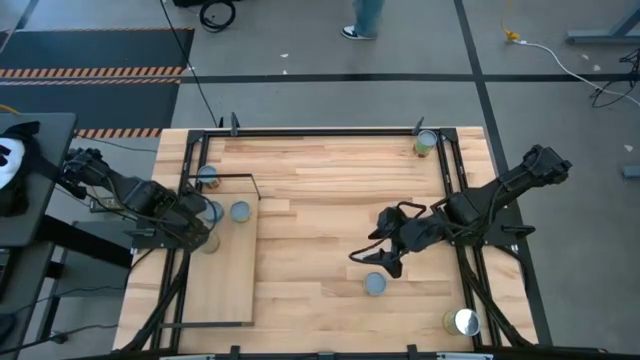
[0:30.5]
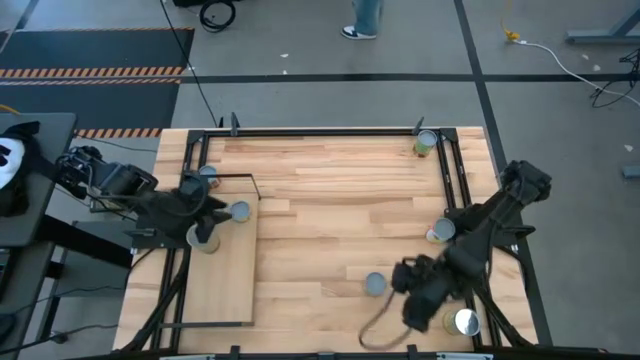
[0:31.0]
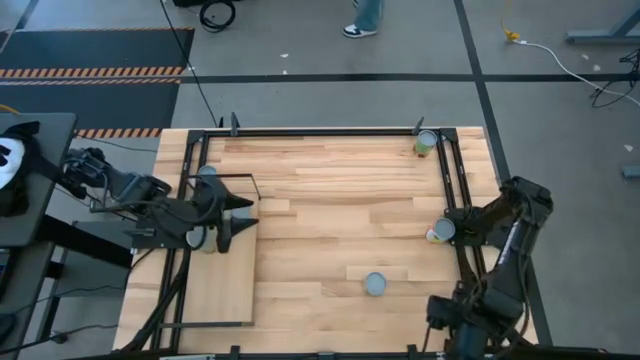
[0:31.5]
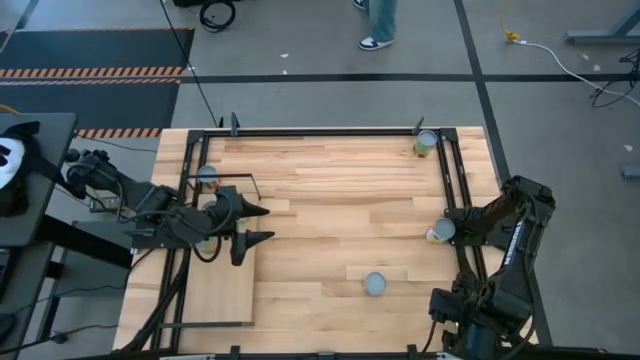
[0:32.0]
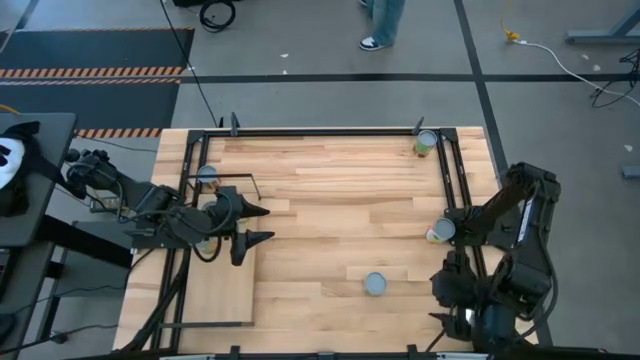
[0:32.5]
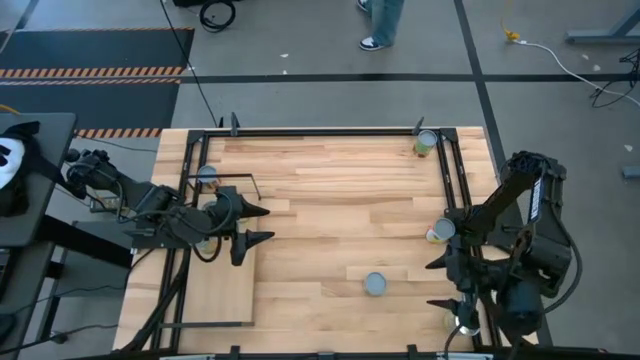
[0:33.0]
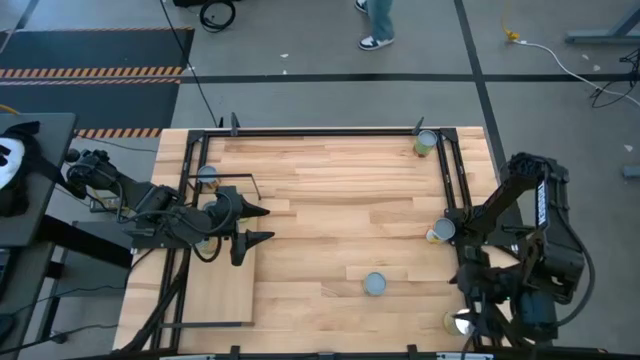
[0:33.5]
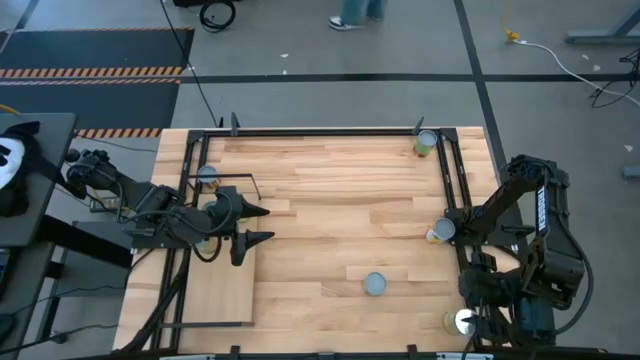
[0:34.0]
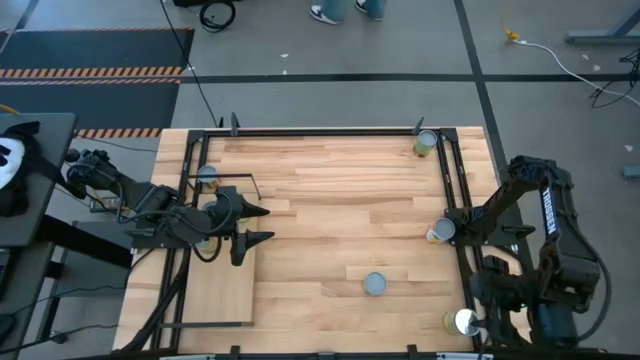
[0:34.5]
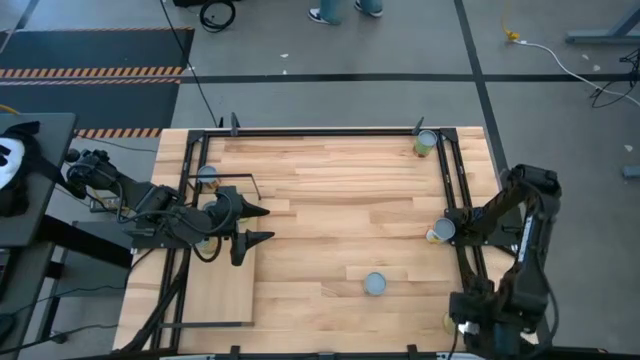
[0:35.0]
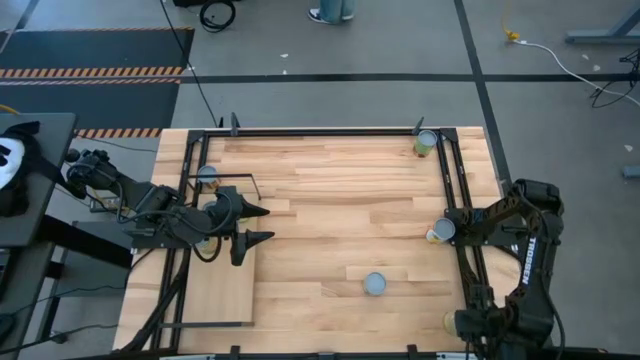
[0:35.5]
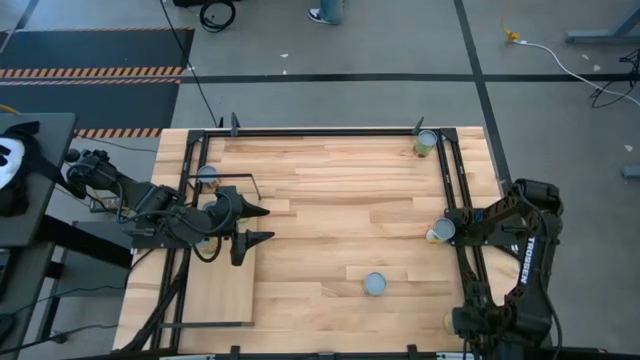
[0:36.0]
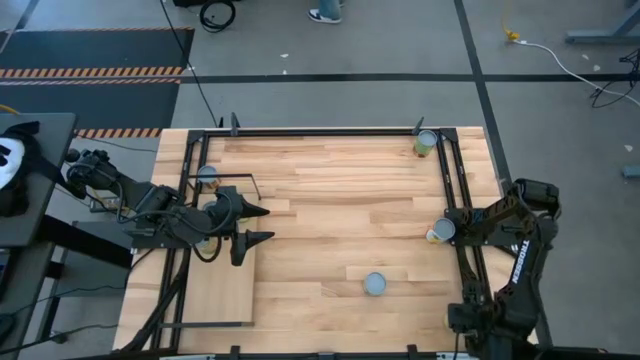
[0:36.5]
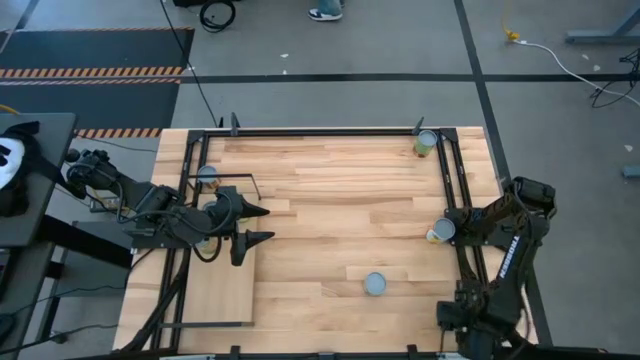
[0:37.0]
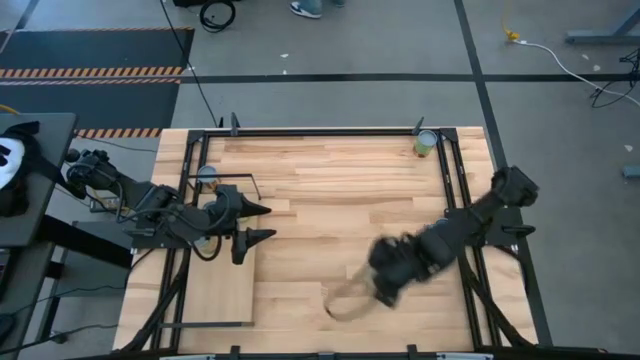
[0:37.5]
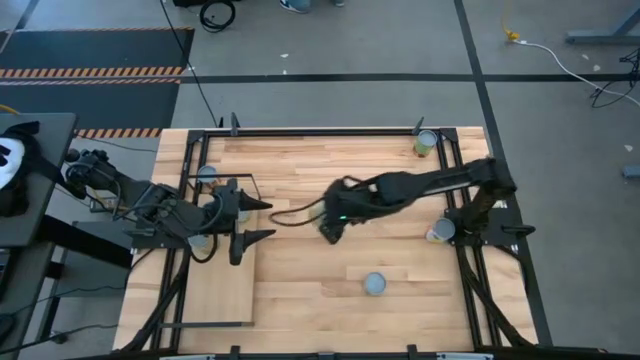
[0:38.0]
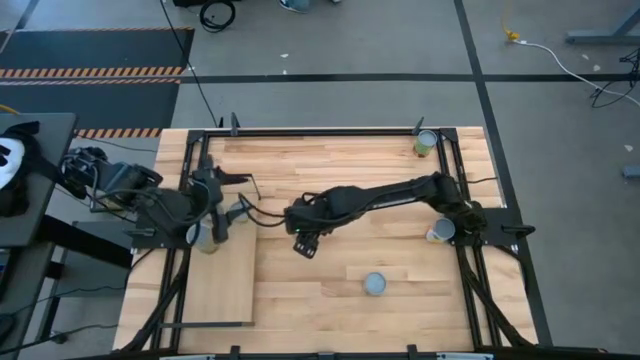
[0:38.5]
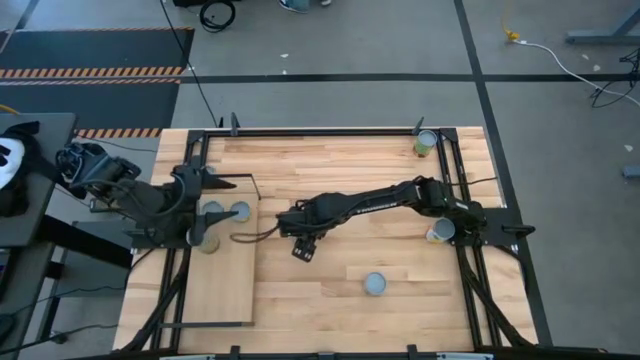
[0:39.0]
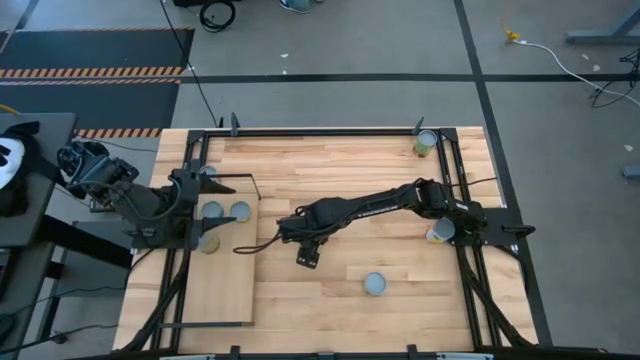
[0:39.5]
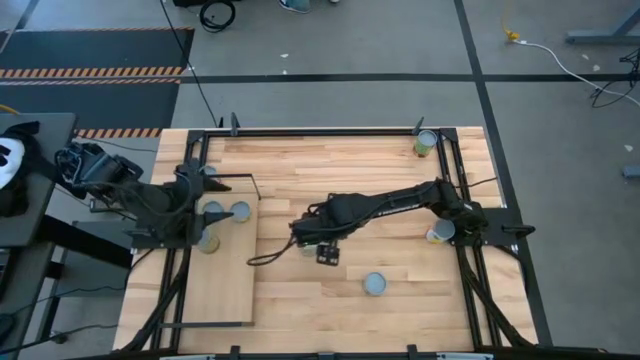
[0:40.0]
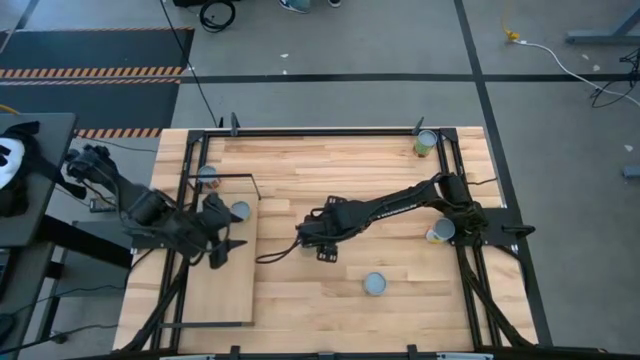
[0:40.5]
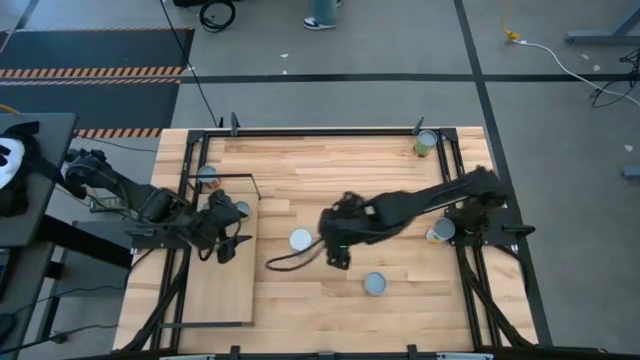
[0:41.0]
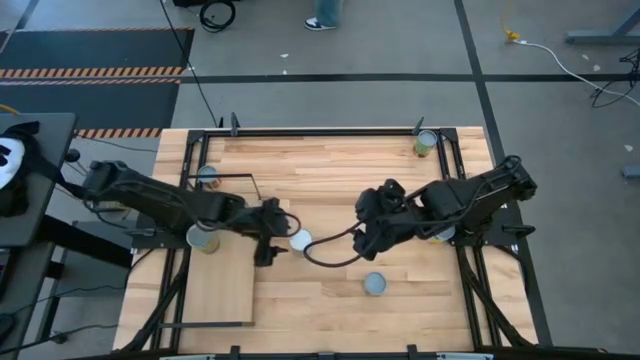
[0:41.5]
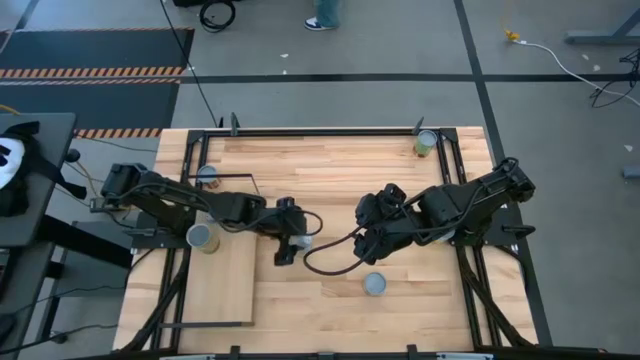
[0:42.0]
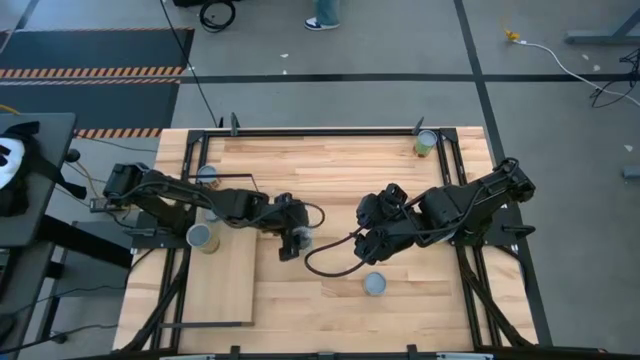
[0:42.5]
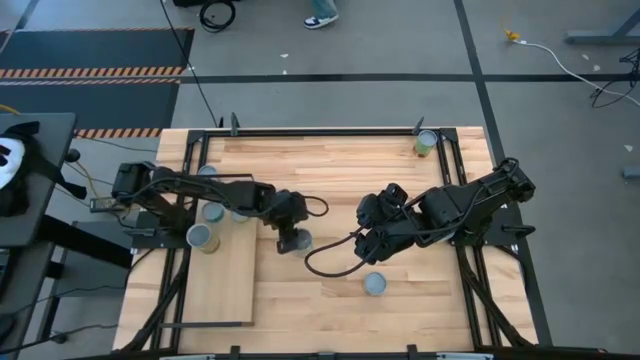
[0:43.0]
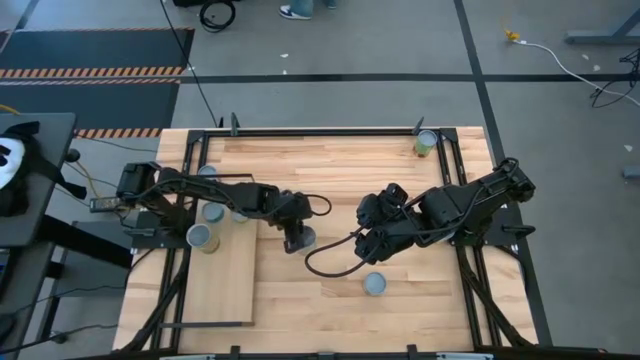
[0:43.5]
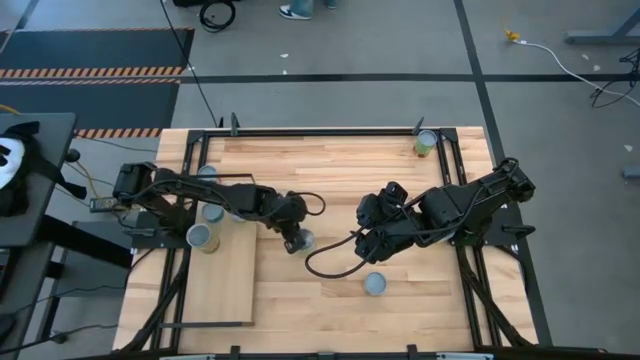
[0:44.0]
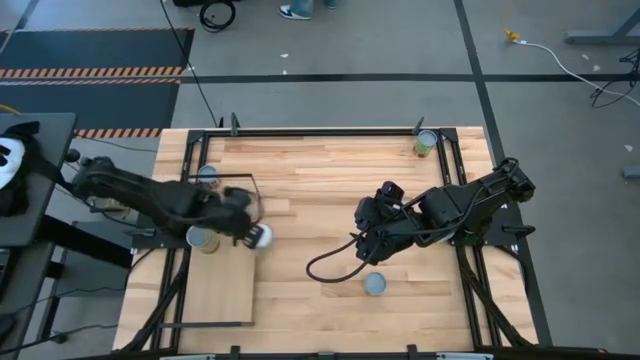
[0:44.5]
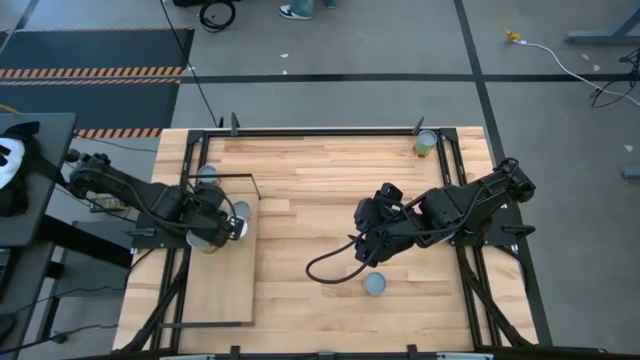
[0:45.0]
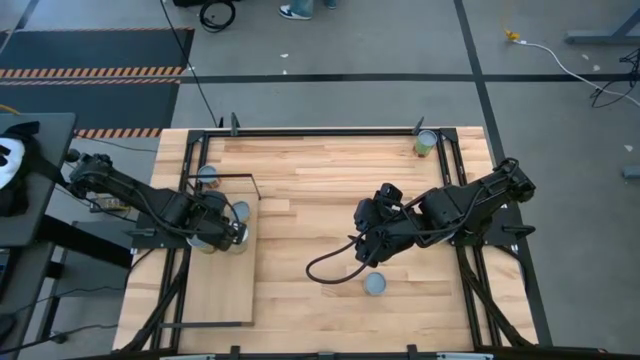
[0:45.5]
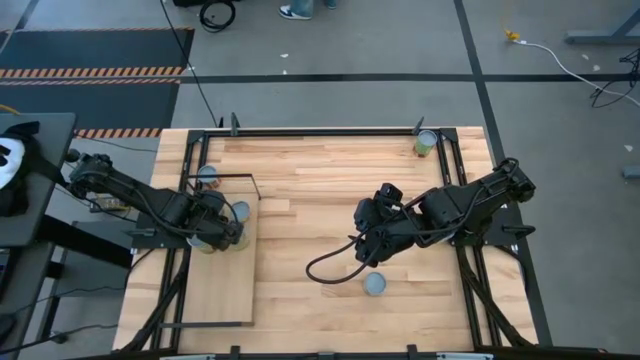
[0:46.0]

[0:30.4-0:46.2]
Task: Pick and place cans onto a shelf
Put the canned carrots on the shelf

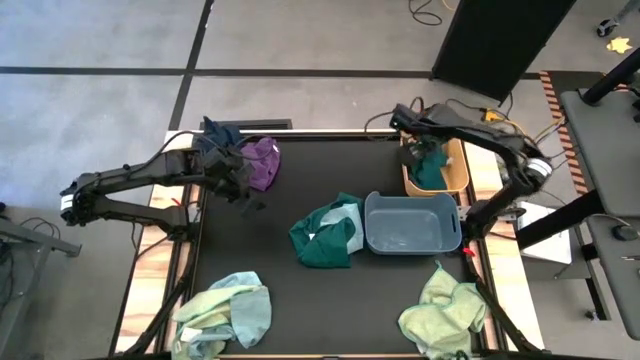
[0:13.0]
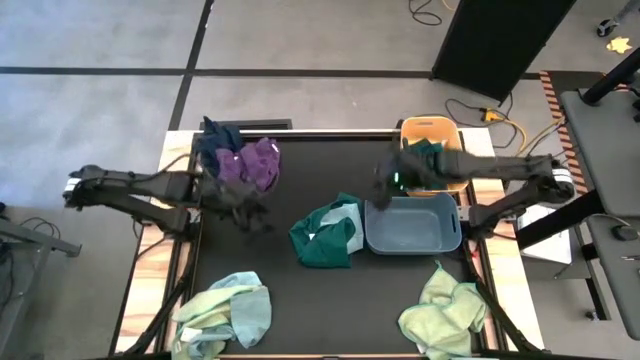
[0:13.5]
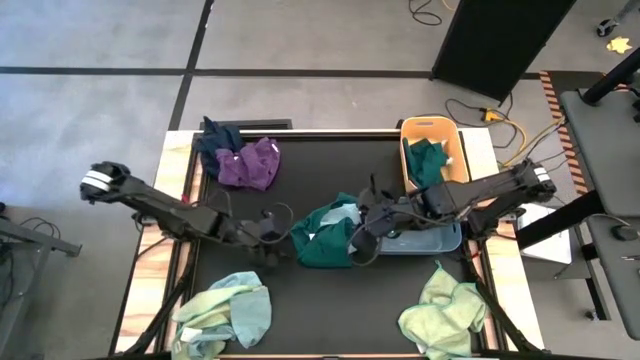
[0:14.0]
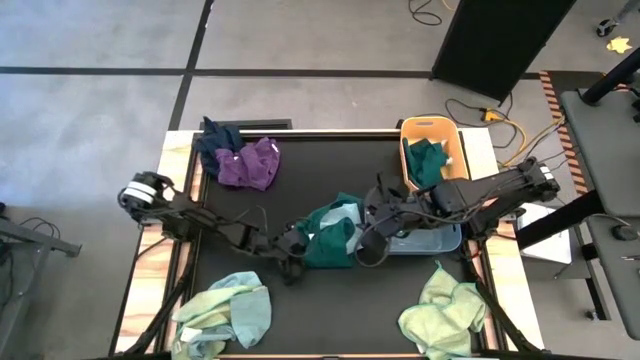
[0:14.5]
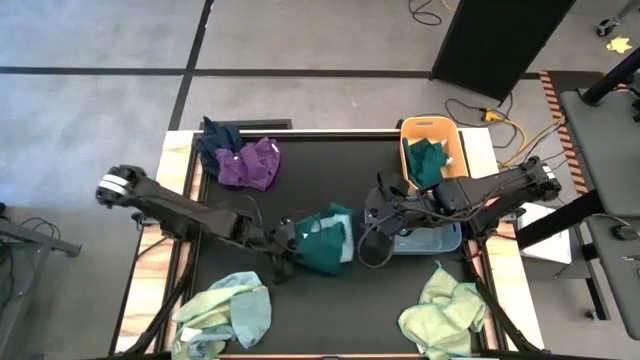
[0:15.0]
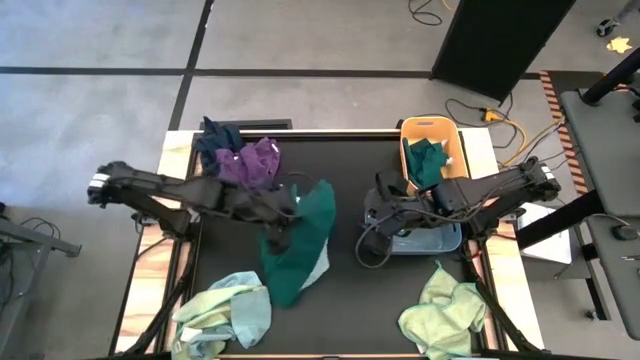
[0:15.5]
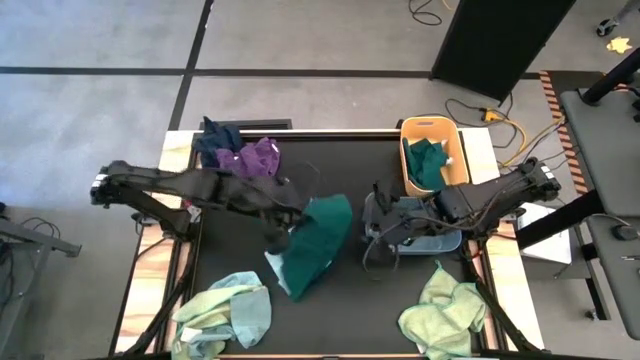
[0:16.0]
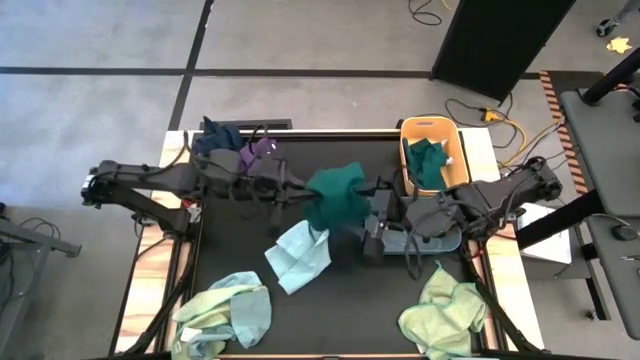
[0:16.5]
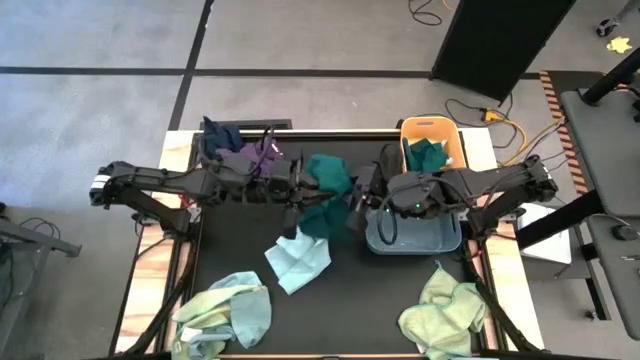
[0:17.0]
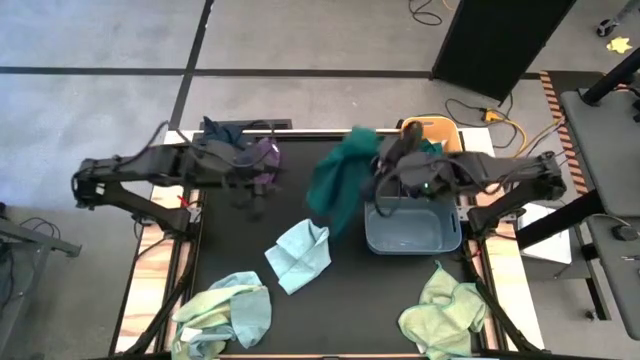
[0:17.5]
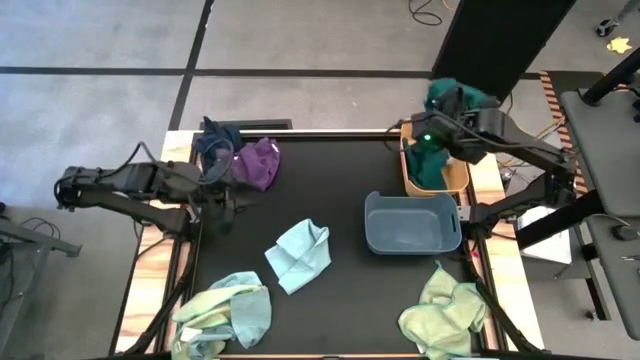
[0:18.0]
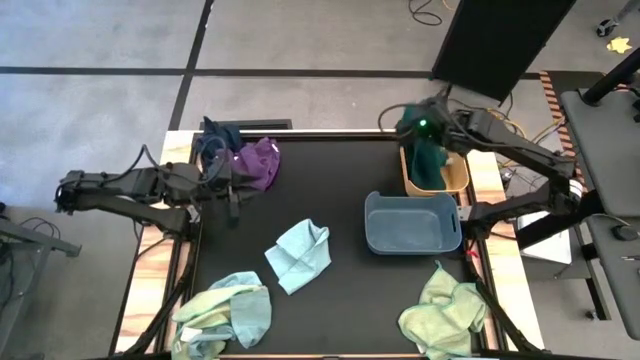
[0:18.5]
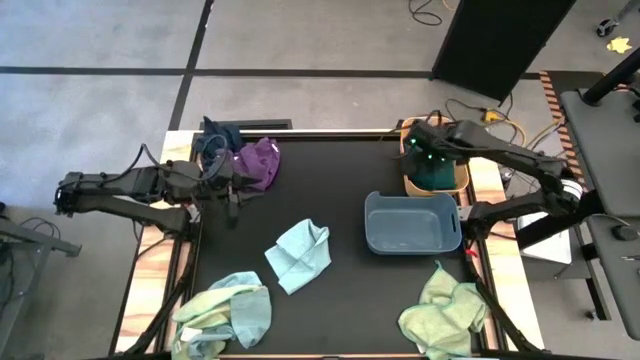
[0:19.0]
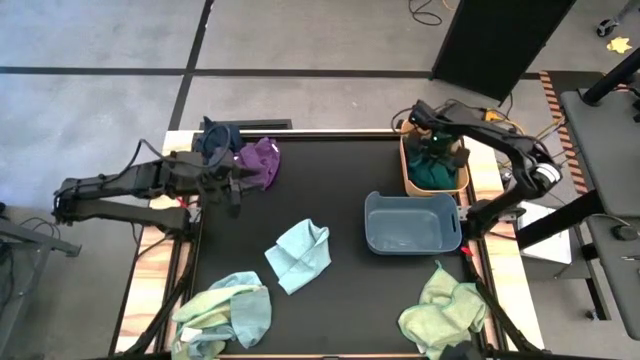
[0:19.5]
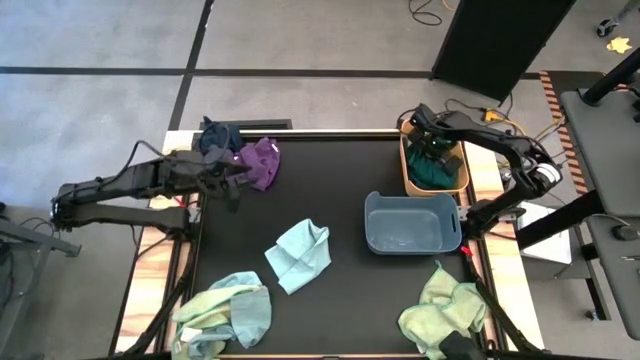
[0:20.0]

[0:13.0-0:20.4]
Task: Sort towels by color in basket
Put the green towel into the yellow bin
